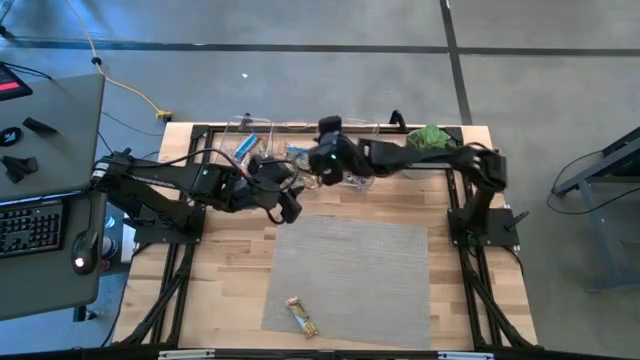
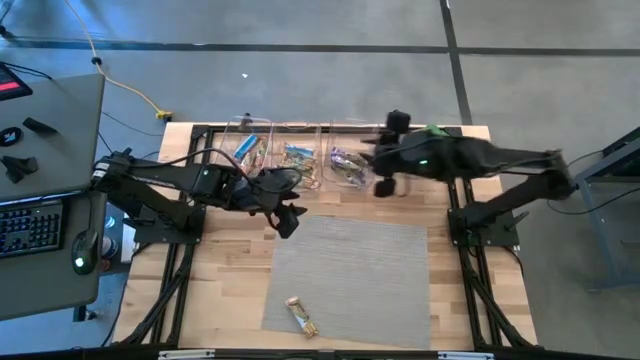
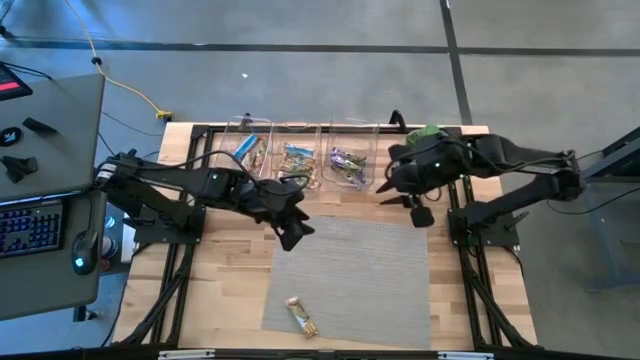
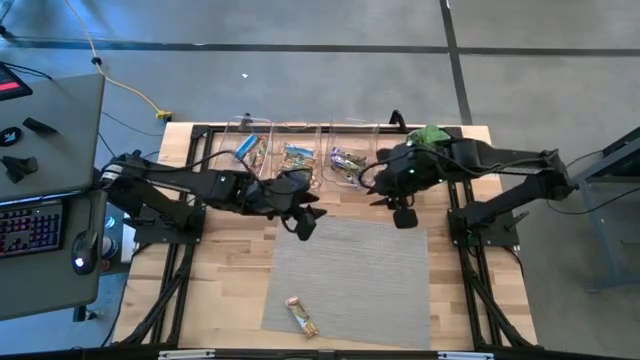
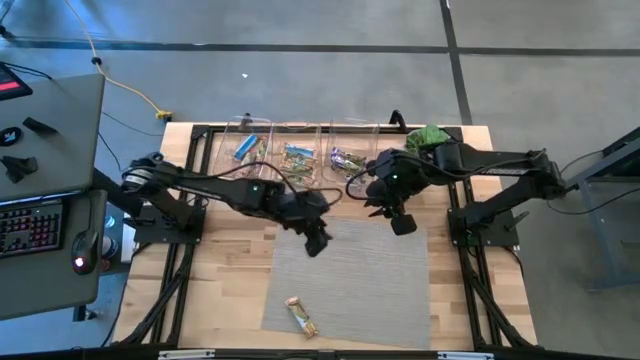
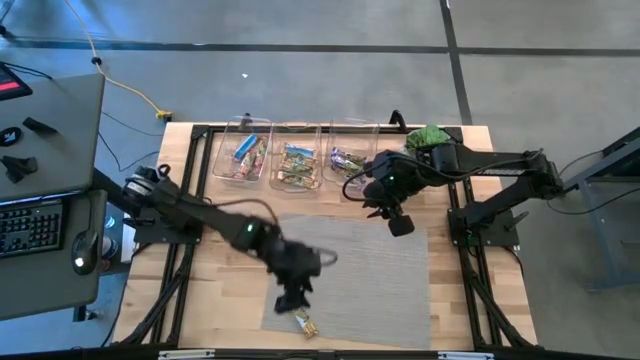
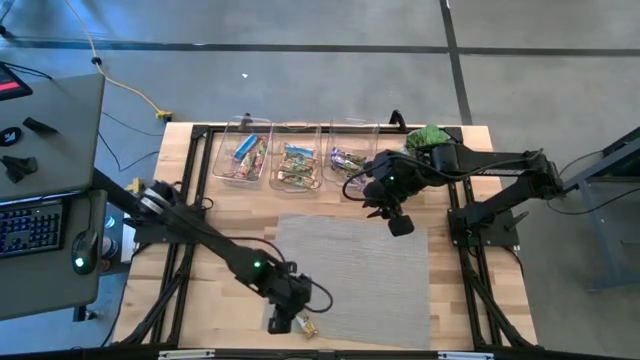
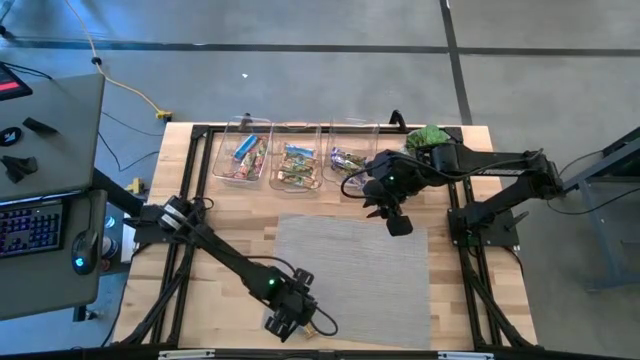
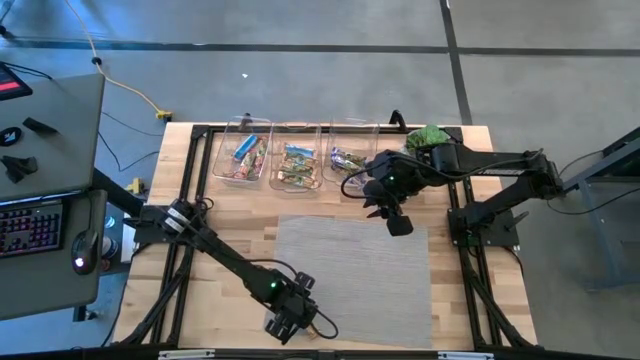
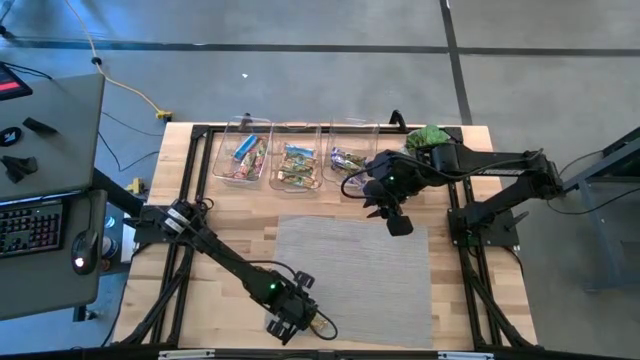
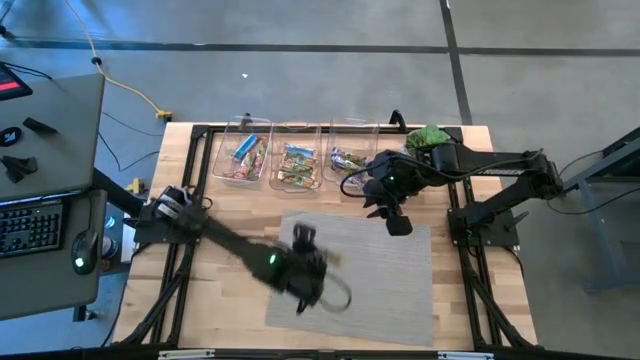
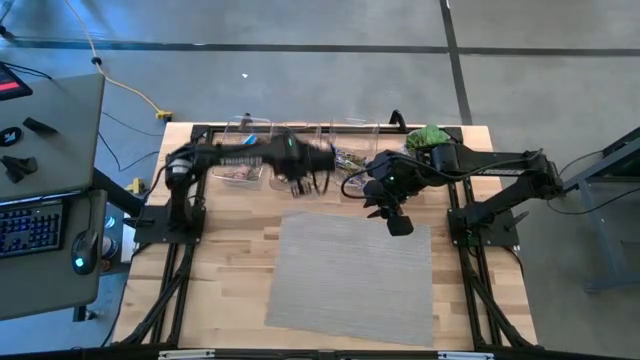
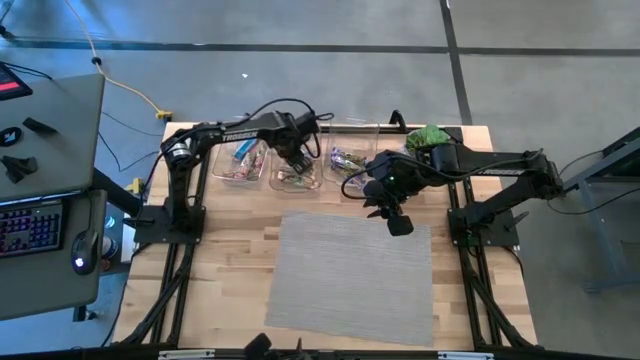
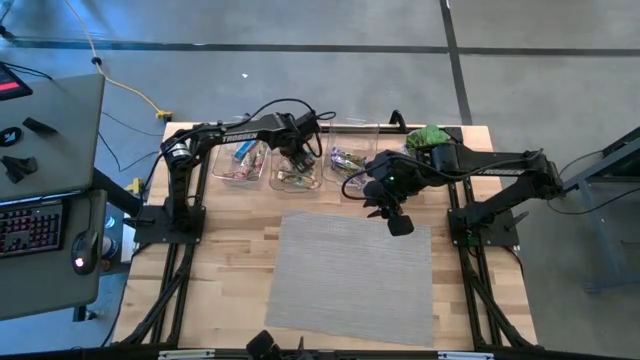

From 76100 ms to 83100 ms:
Task: Pick and place Granola Bars by type
Put the yellow granola bar into the middle transparent bin

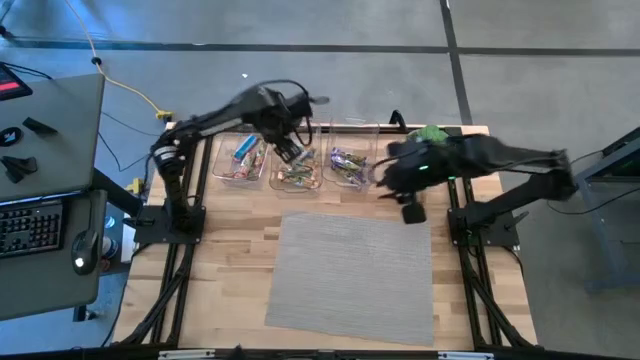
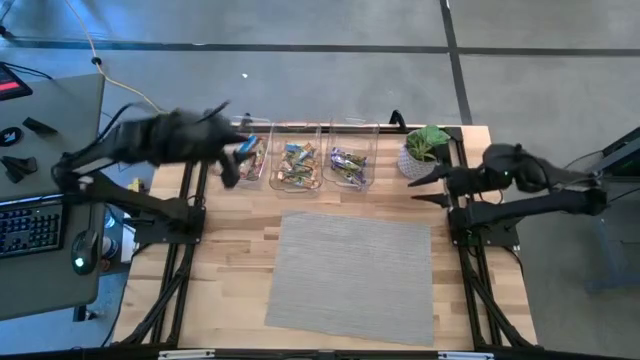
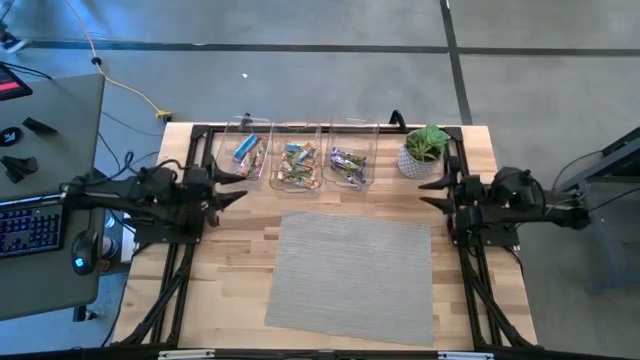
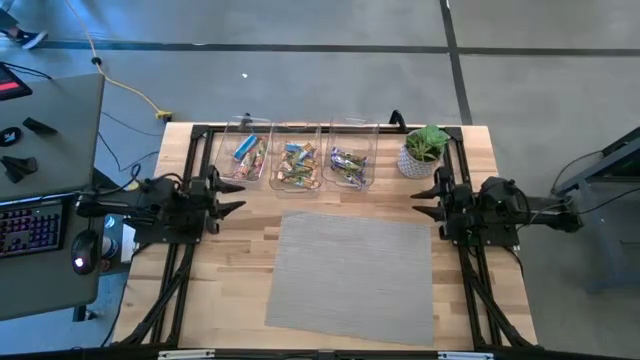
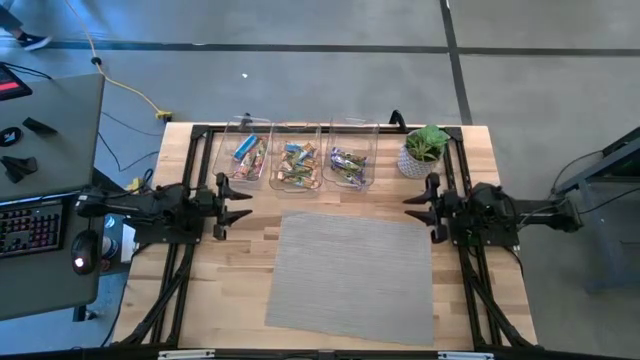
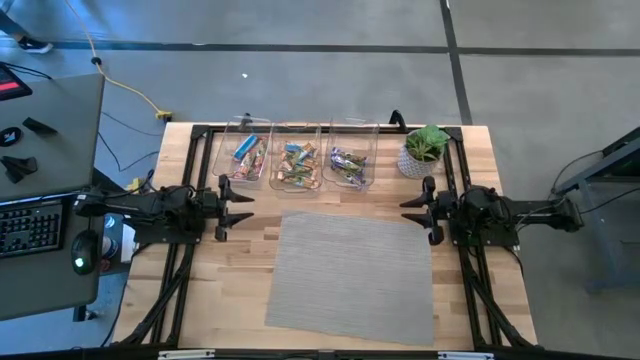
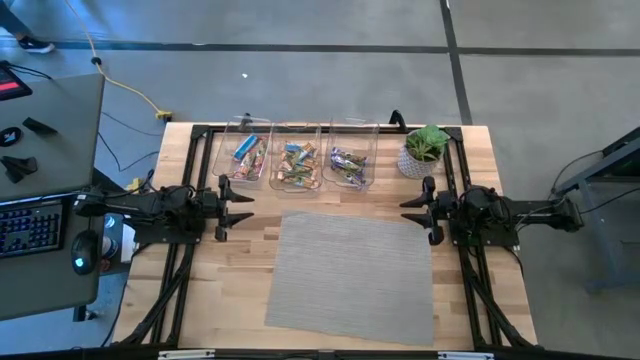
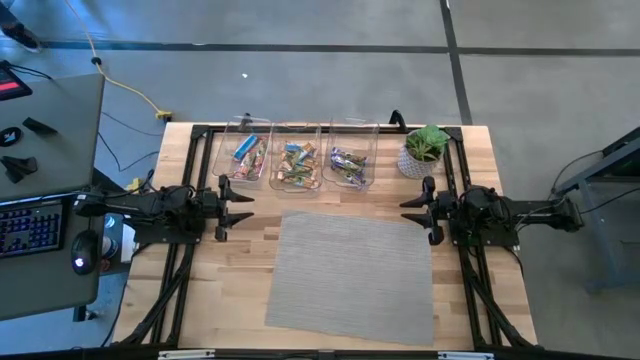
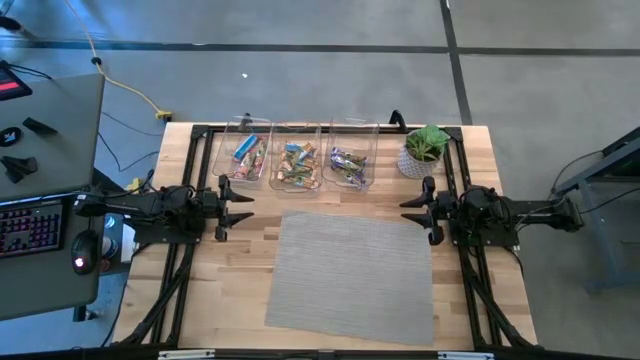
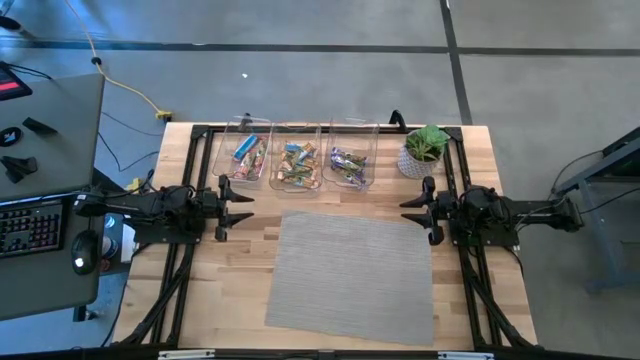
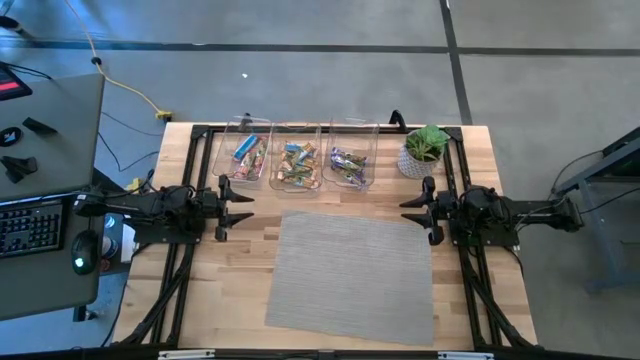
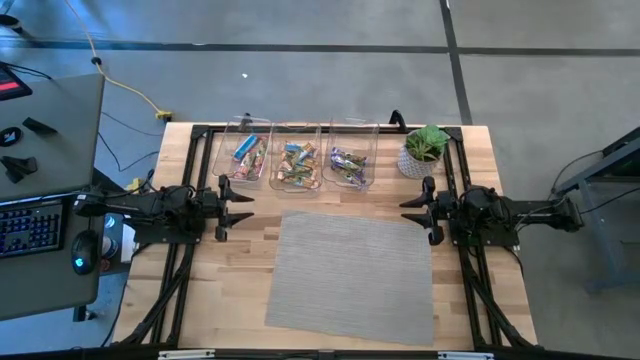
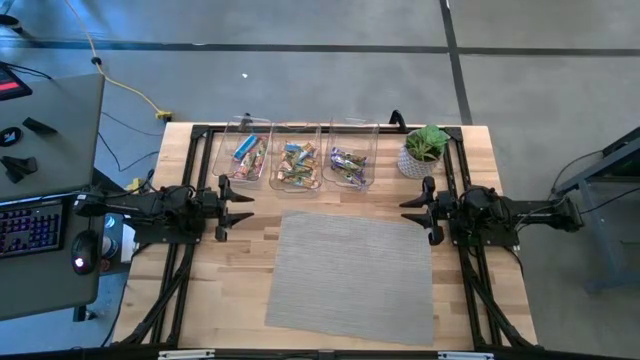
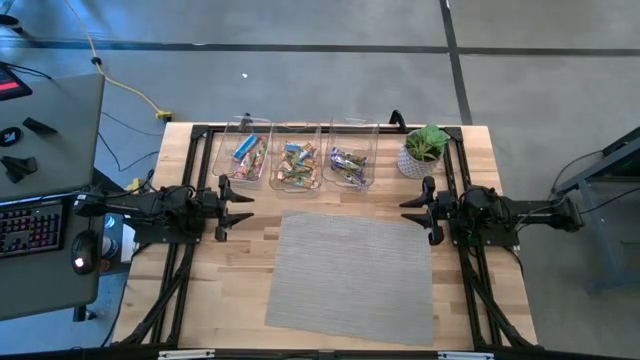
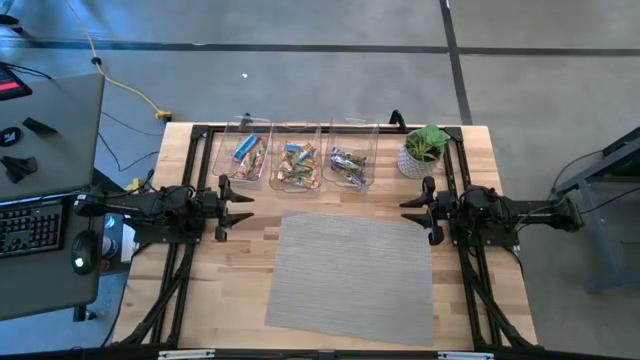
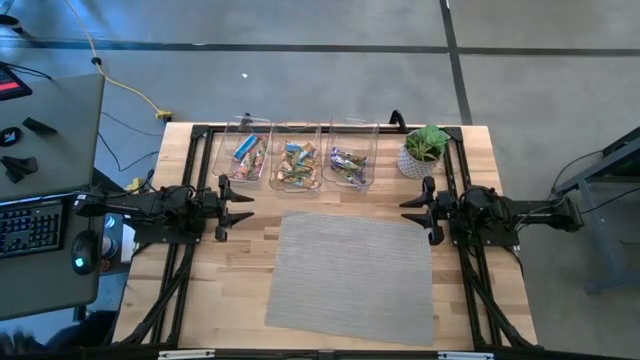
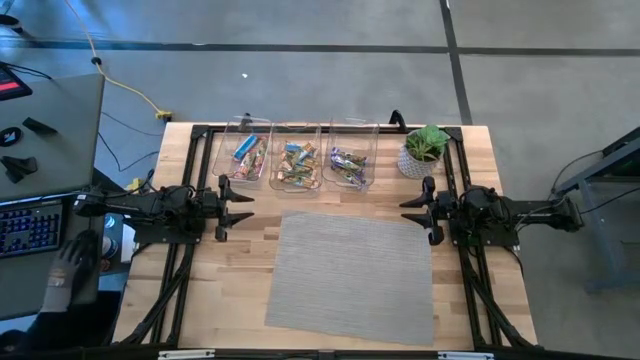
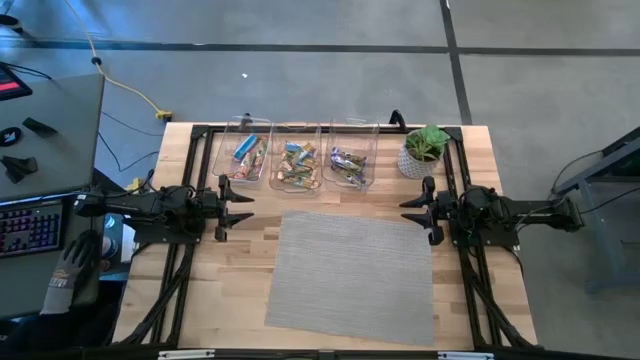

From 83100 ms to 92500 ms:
Return to Home Position

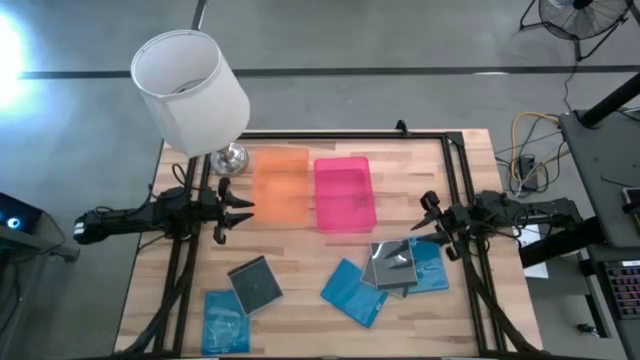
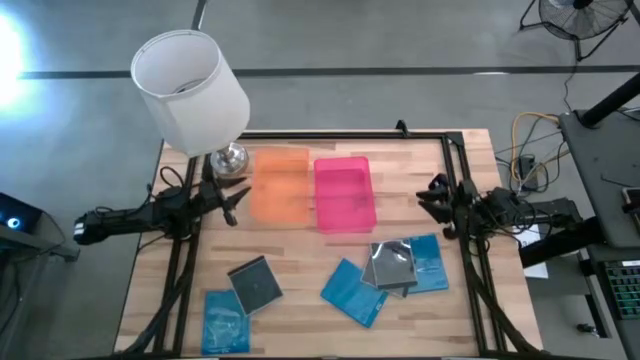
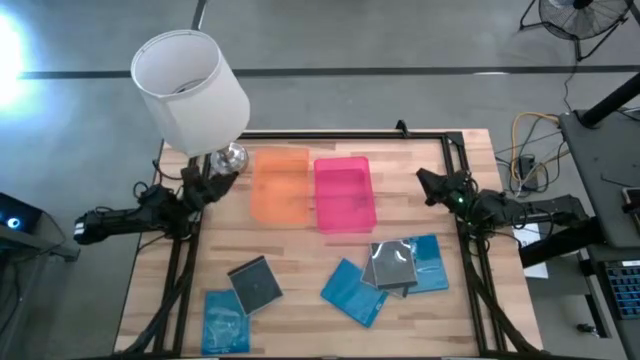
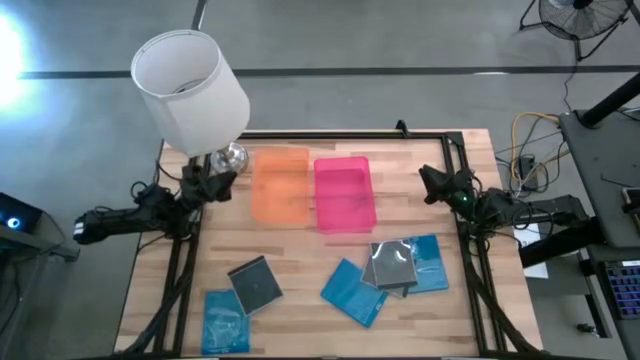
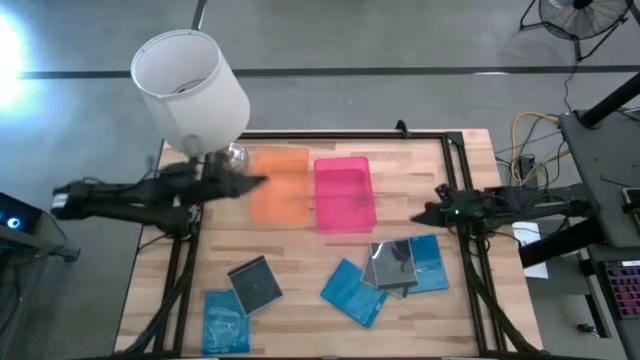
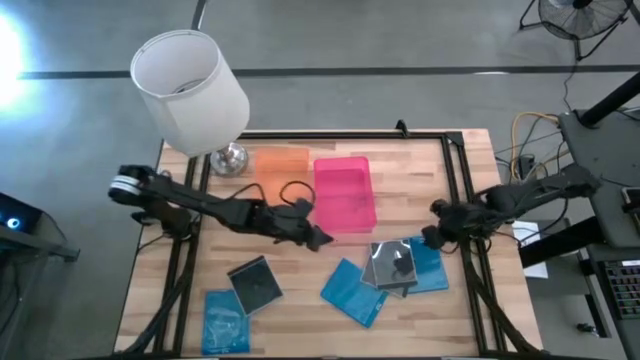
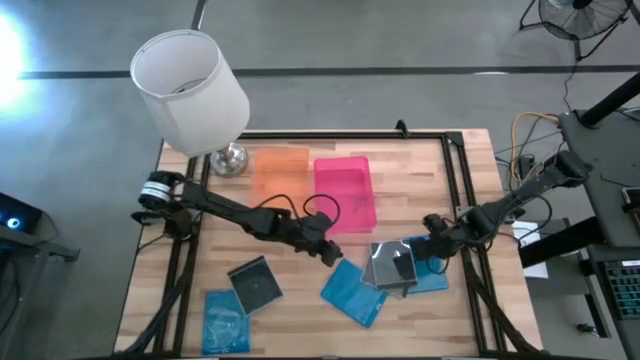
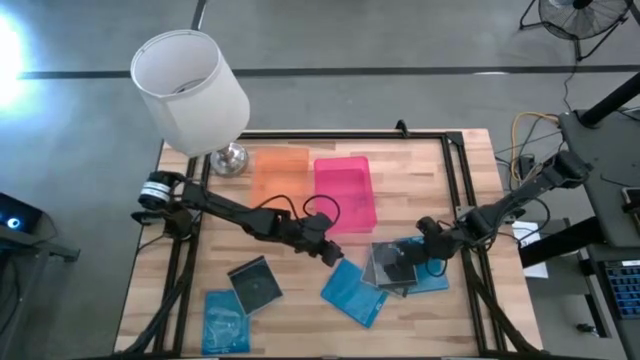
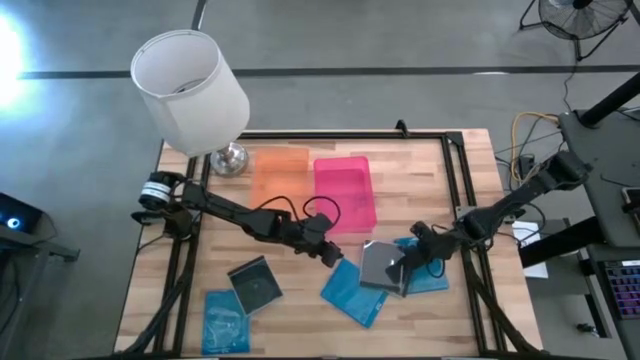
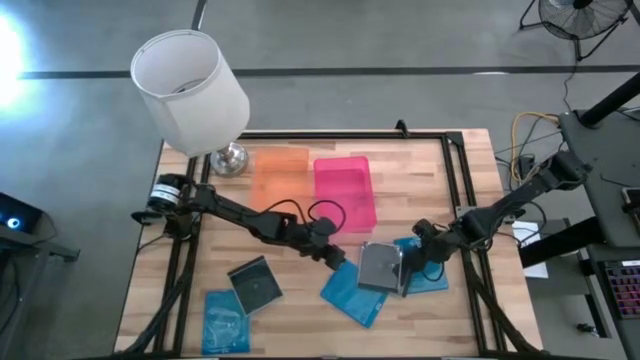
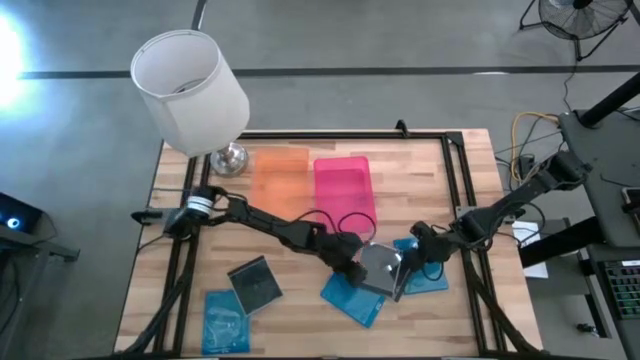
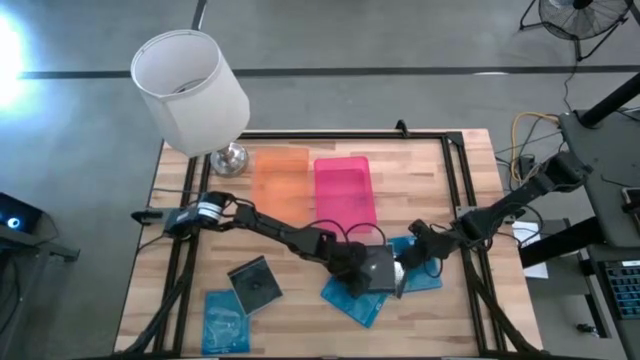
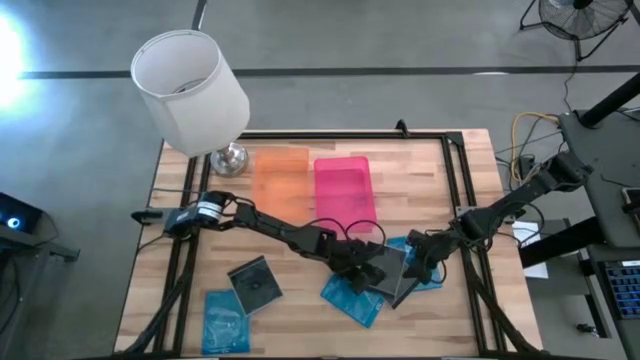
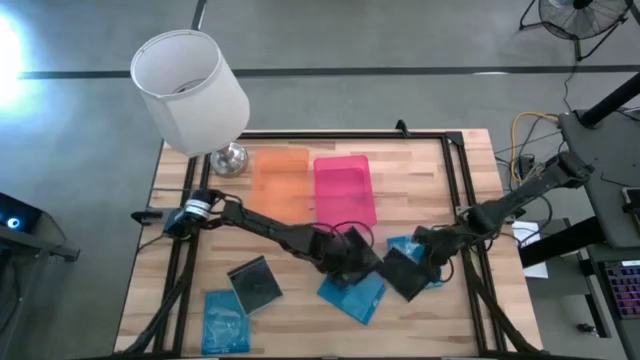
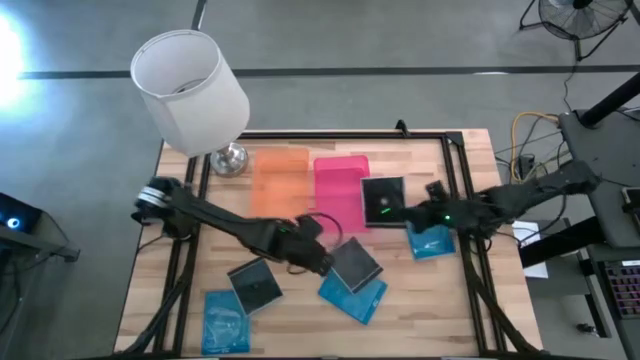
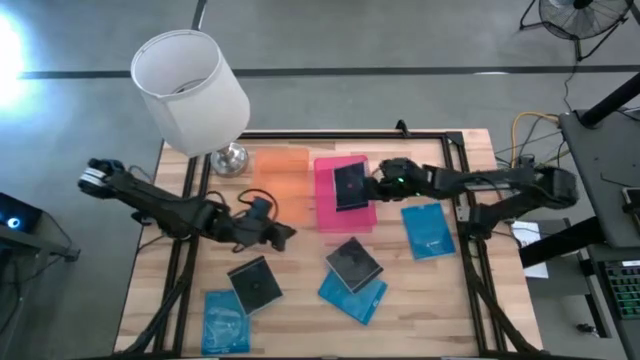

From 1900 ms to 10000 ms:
Task: Pick & place jewel cases by type
Put the right black CD case into the pink bin
